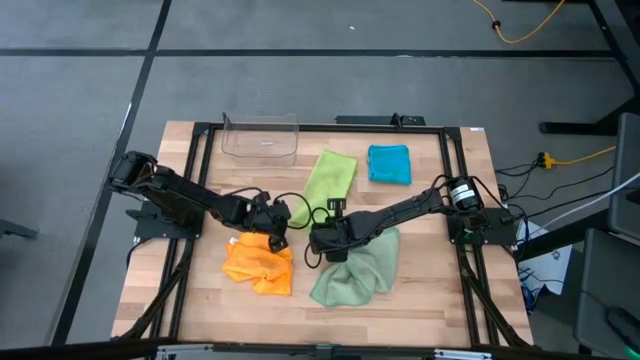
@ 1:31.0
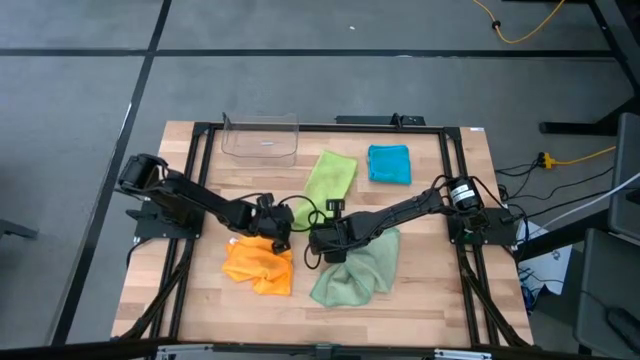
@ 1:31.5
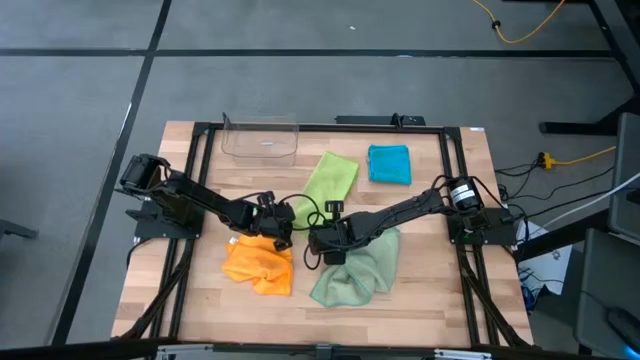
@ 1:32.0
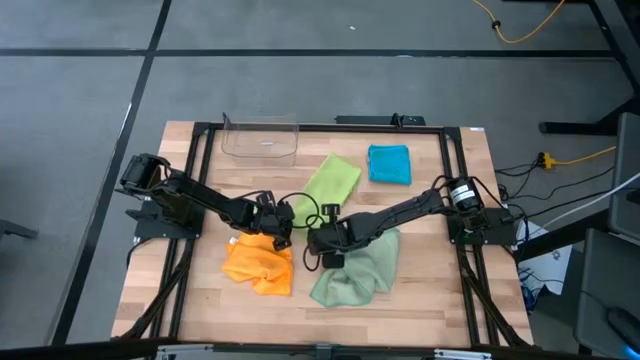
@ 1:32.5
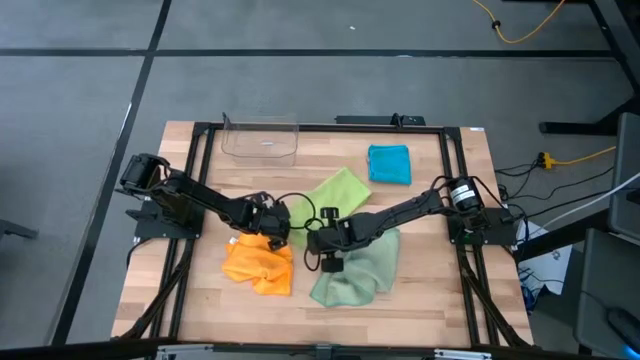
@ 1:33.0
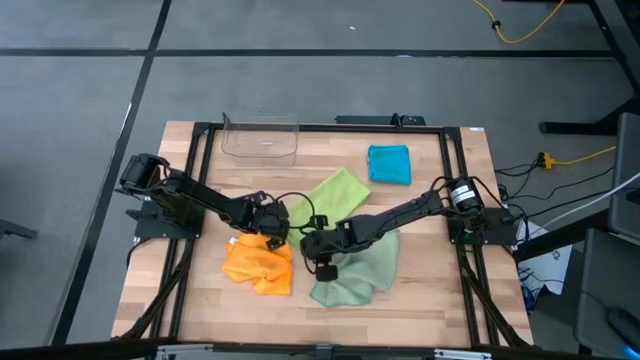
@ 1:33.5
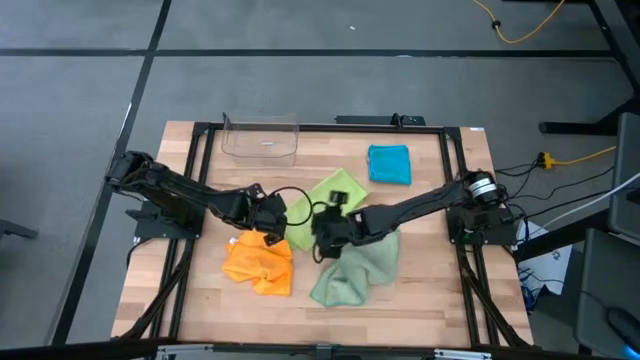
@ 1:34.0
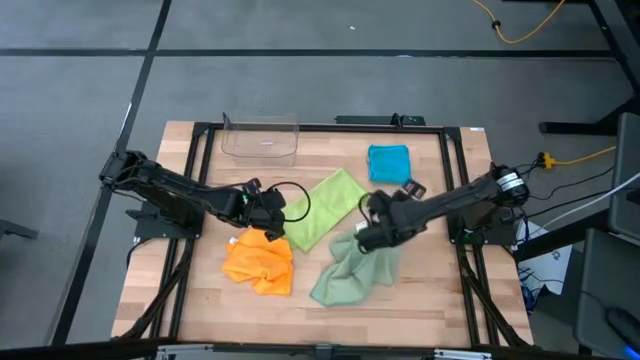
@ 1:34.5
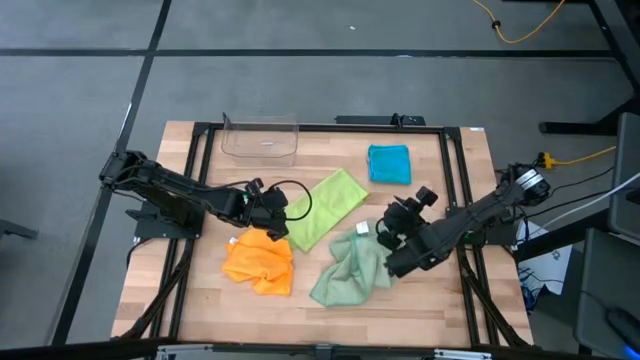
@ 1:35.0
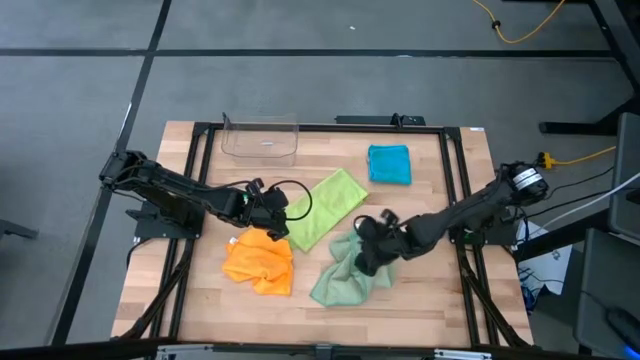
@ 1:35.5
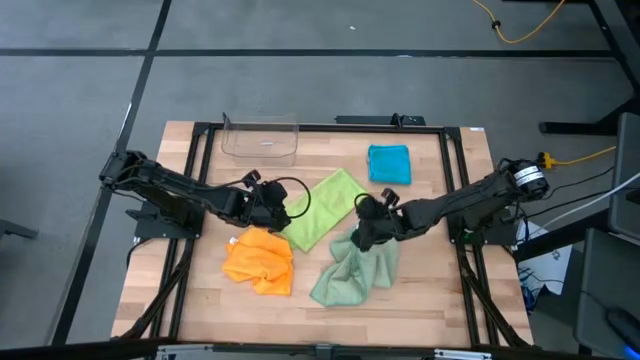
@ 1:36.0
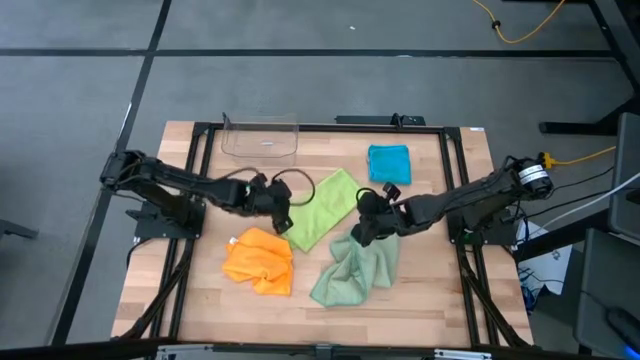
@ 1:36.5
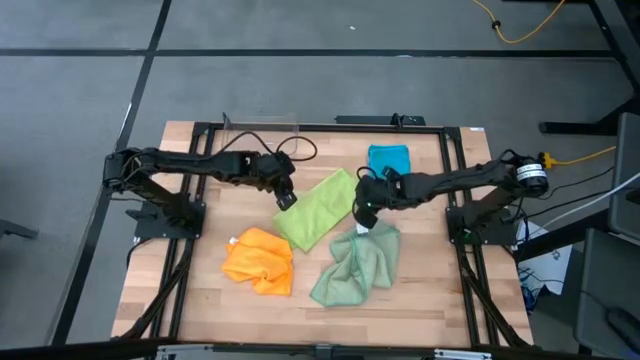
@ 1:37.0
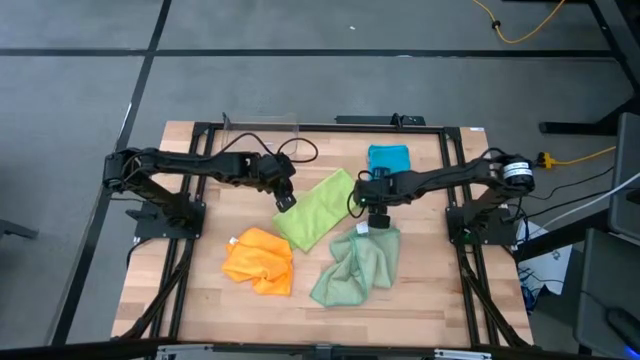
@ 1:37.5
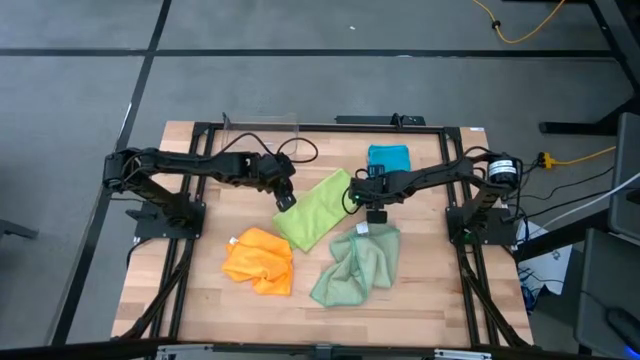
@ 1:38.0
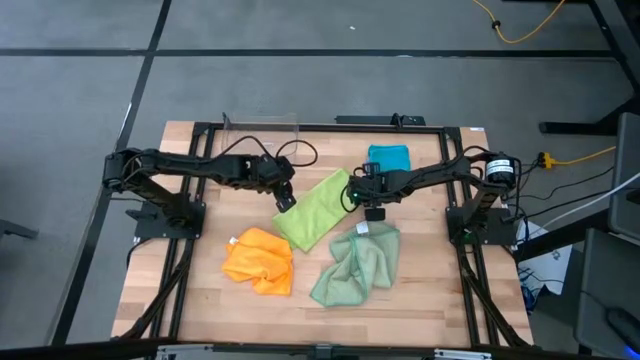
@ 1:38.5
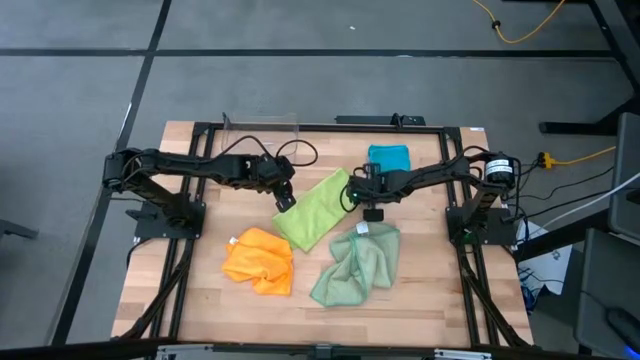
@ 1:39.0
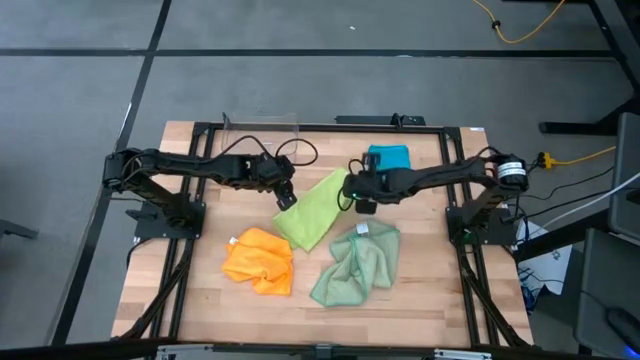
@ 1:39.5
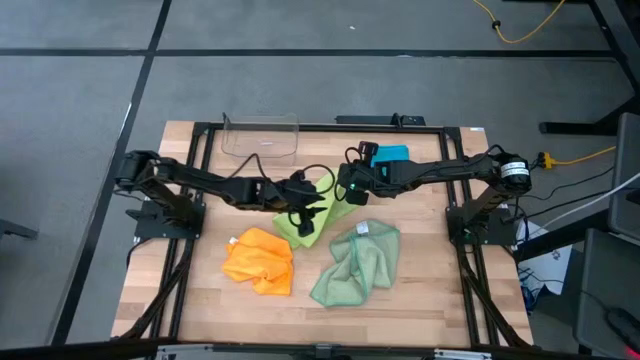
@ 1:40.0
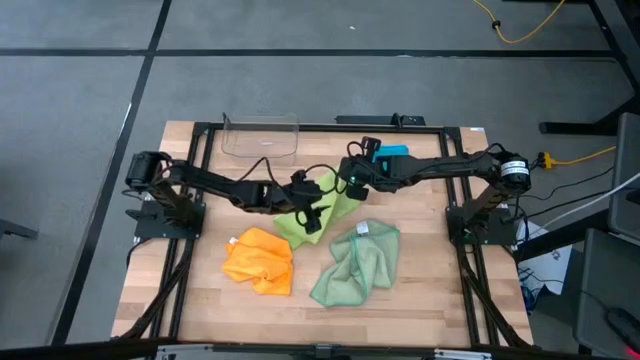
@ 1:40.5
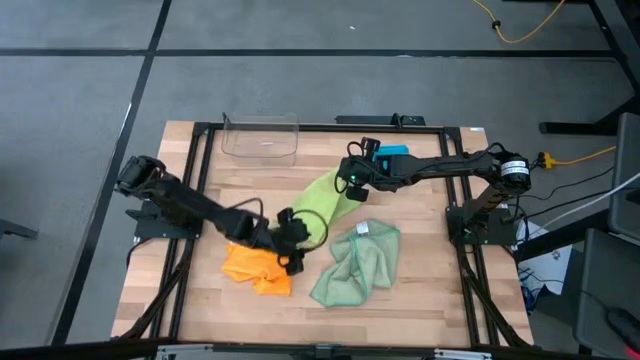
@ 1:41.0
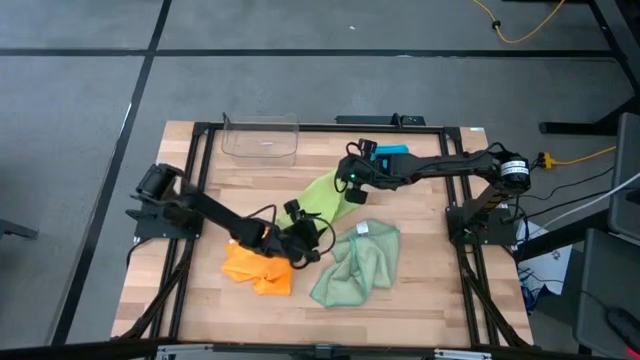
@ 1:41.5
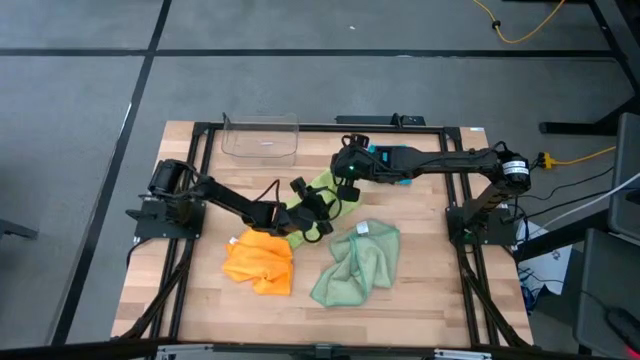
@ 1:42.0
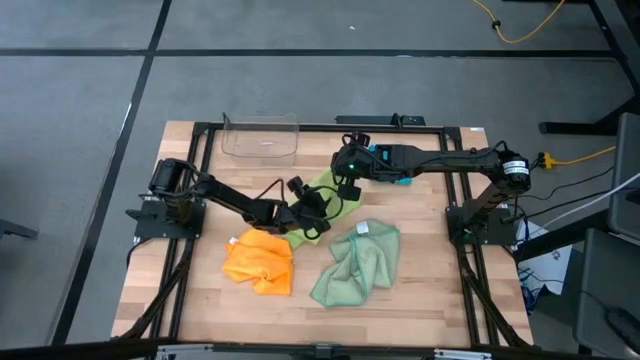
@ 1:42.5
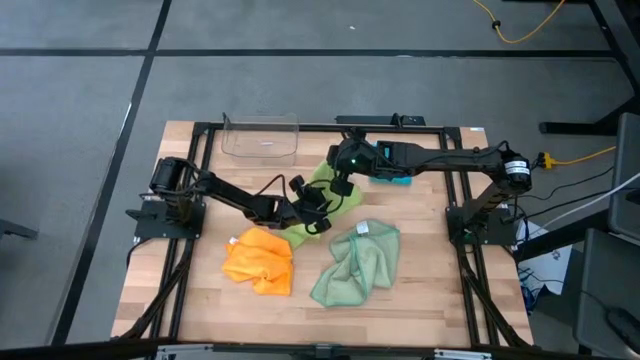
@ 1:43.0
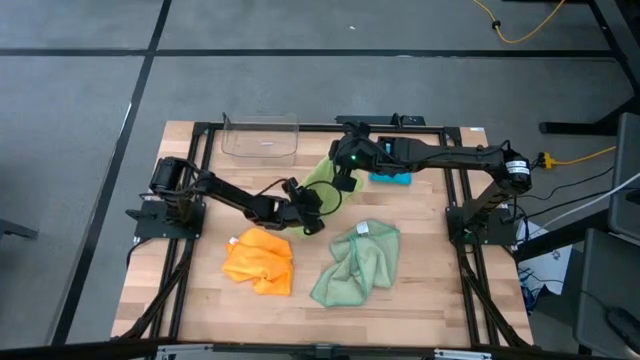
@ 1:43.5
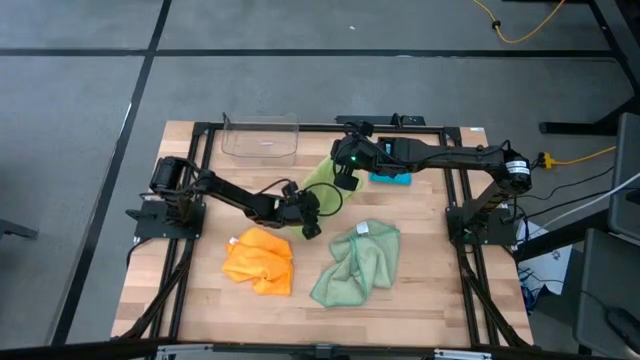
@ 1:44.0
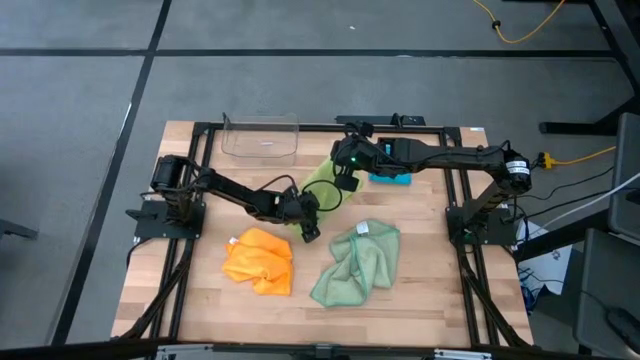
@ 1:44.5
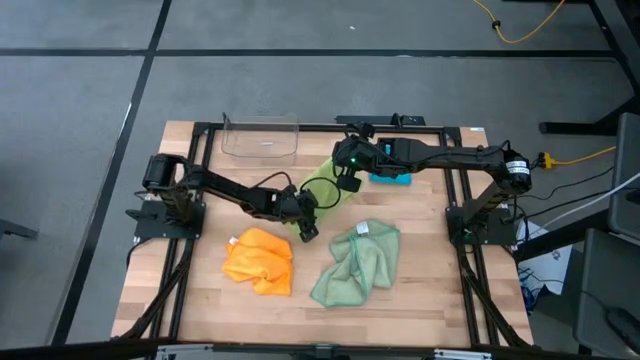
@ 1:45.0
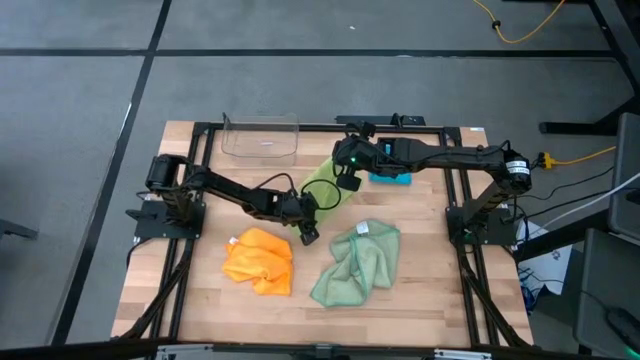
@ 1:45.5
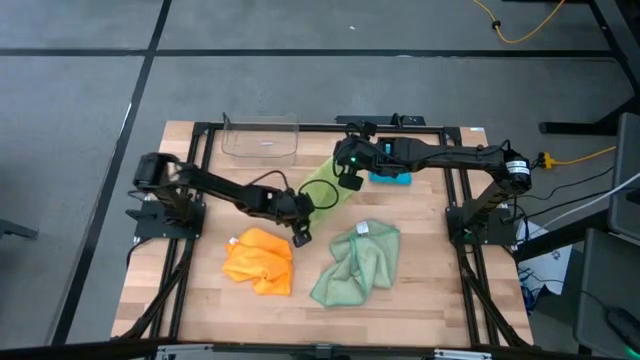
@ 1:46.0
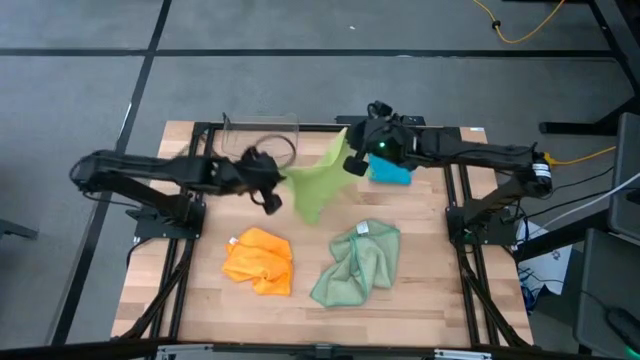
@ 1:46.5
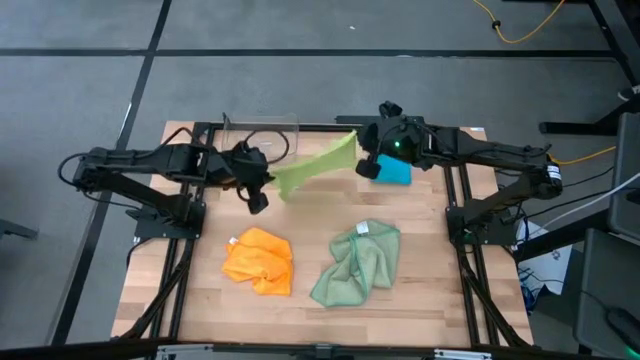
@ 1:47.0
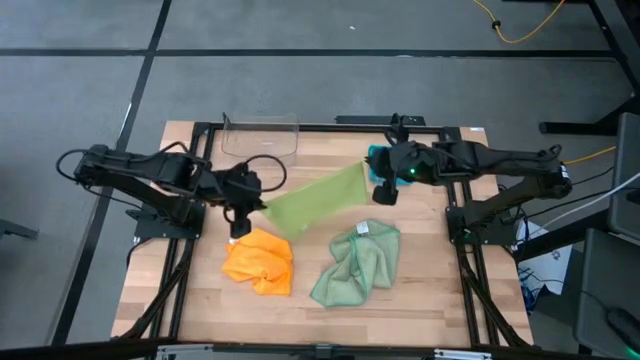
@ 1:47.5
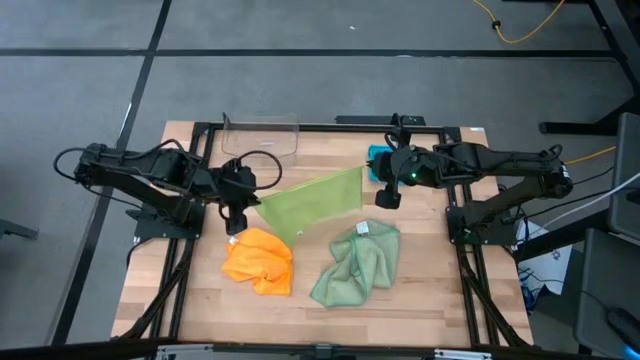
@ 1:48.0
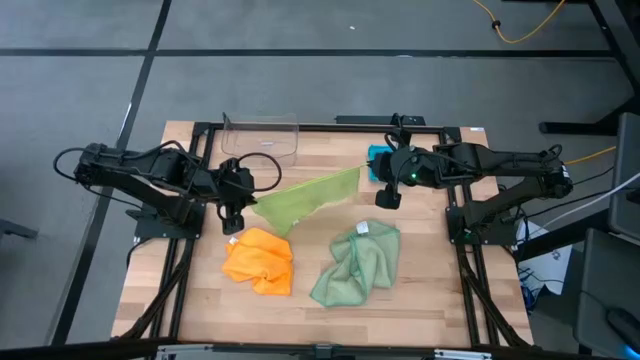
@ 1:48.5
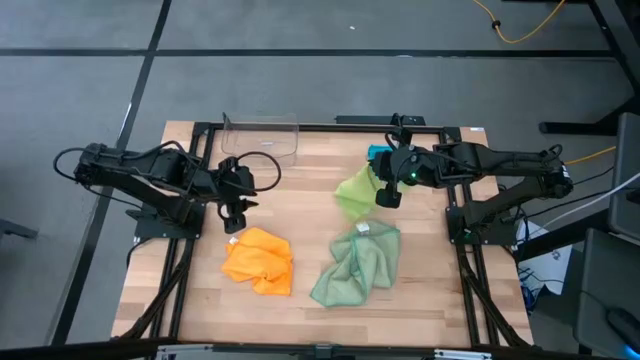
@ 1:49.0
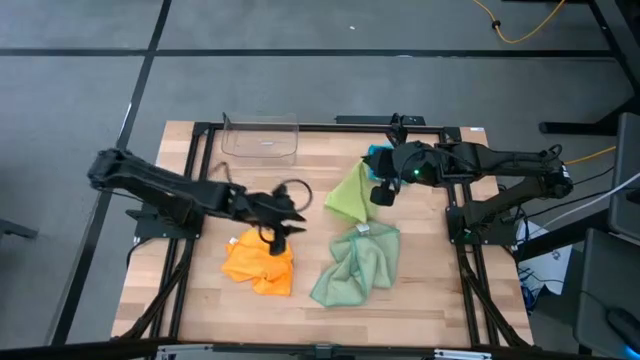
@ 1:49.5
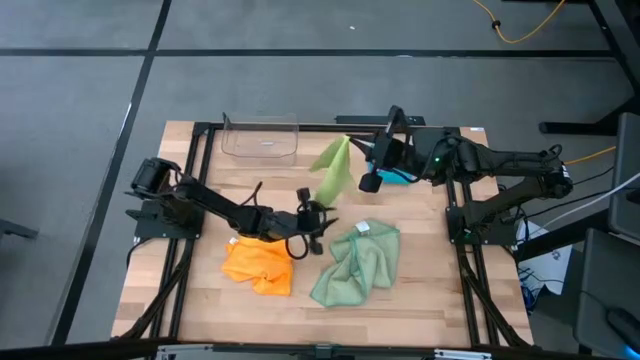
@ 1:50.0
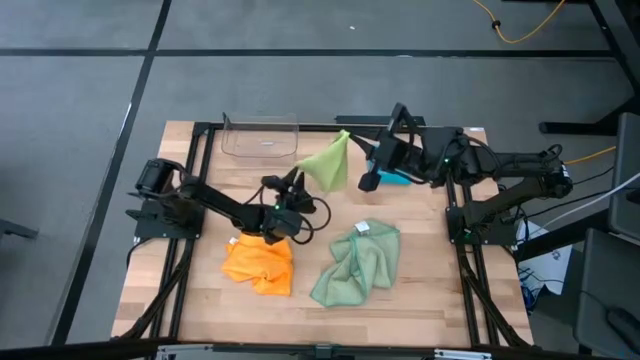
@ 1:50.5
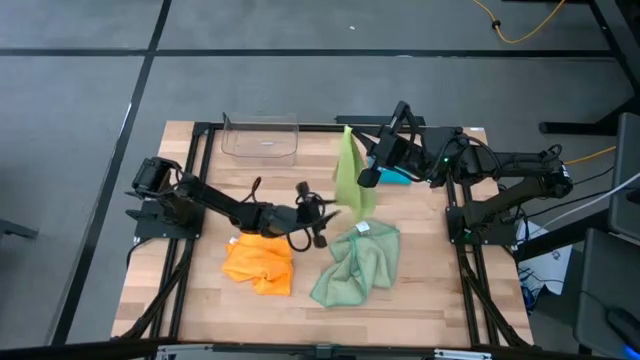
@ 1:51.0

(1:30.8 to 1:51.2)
Task: Fold microfiber towels
Fold the light green towel
